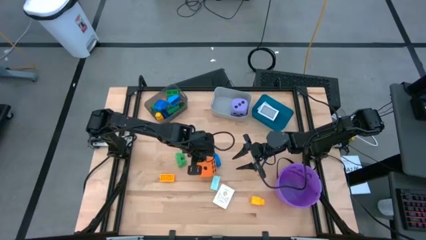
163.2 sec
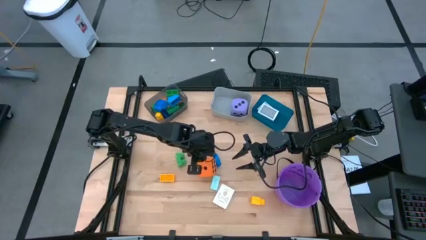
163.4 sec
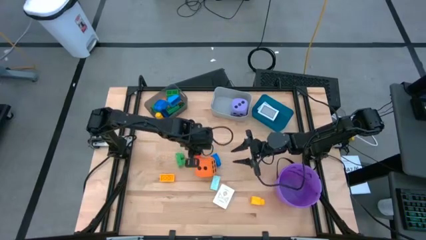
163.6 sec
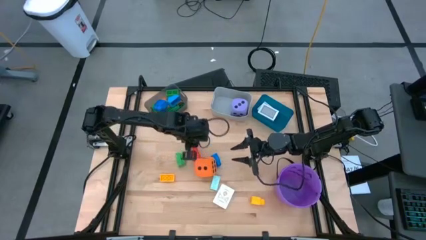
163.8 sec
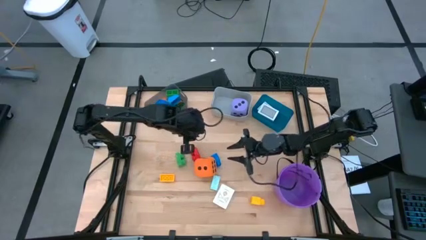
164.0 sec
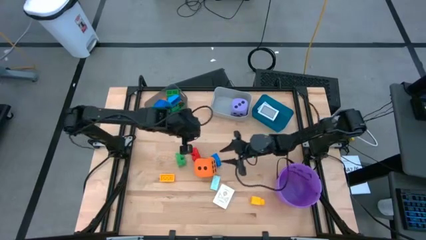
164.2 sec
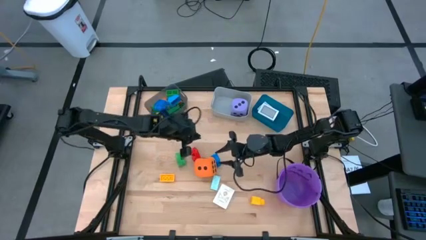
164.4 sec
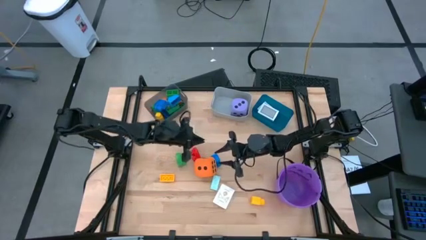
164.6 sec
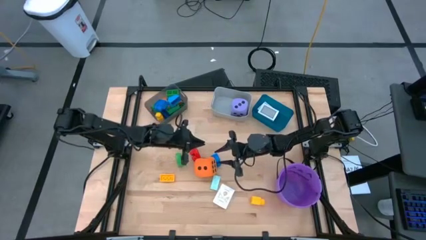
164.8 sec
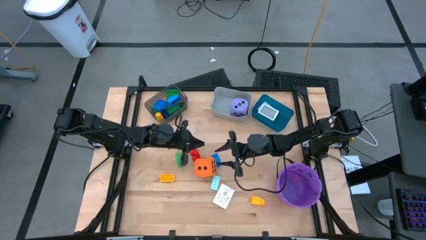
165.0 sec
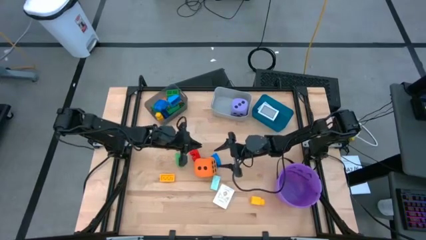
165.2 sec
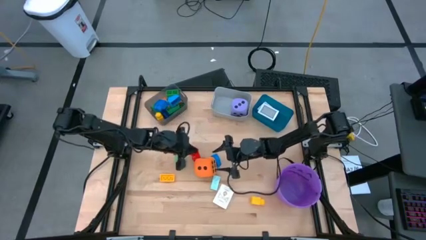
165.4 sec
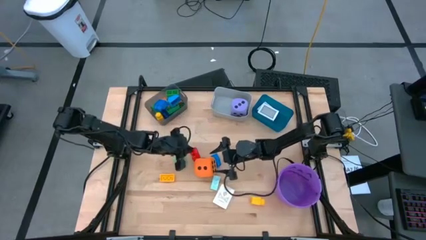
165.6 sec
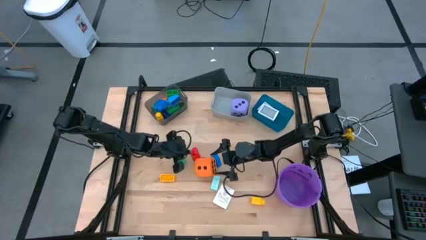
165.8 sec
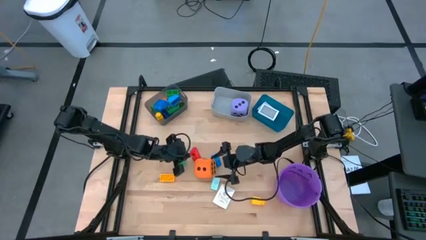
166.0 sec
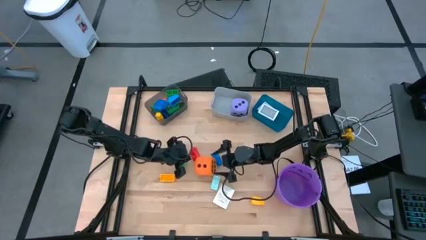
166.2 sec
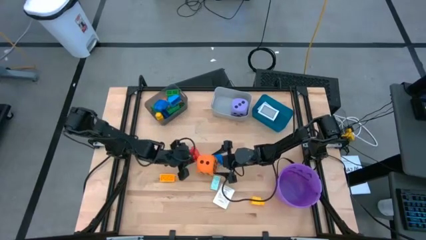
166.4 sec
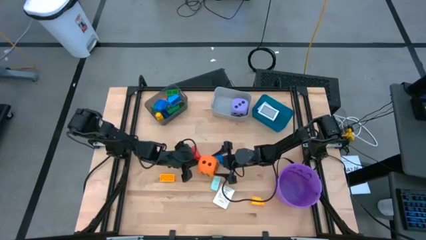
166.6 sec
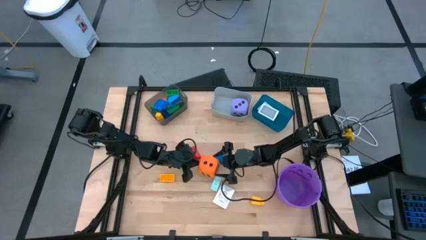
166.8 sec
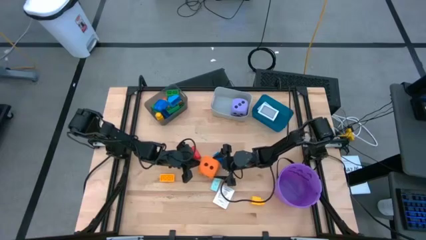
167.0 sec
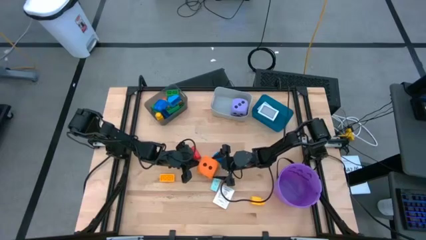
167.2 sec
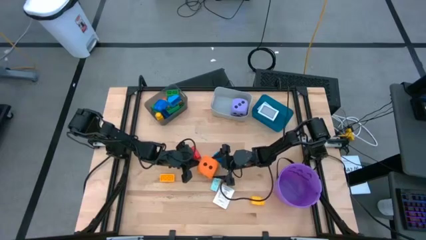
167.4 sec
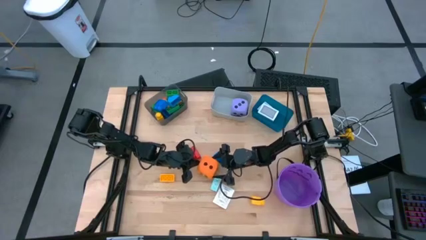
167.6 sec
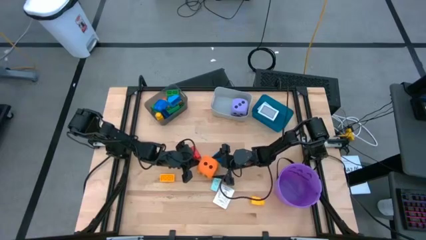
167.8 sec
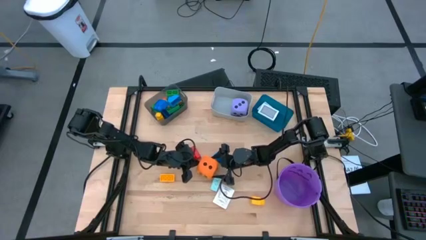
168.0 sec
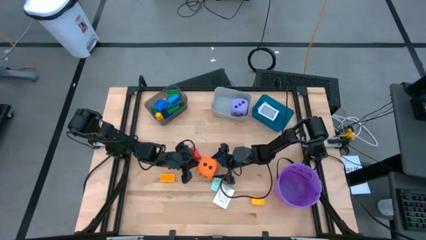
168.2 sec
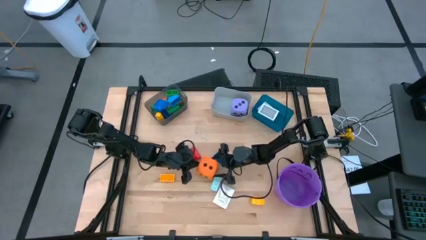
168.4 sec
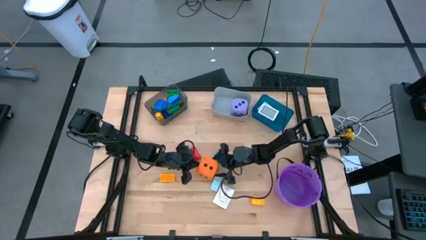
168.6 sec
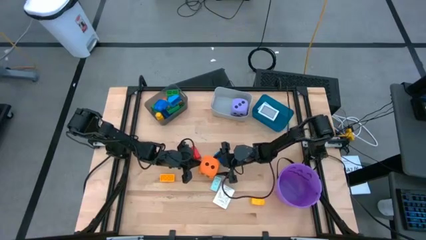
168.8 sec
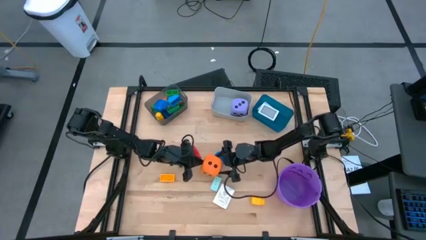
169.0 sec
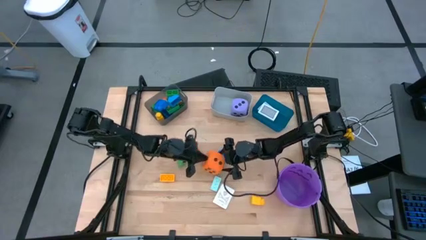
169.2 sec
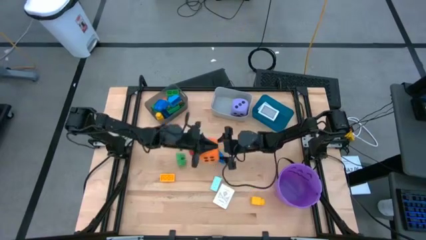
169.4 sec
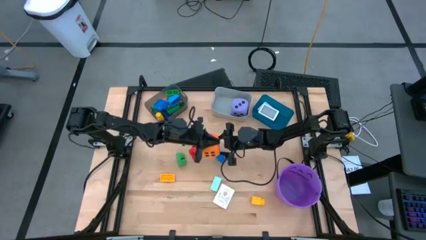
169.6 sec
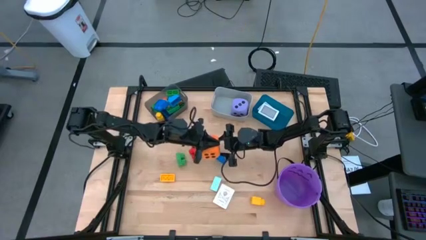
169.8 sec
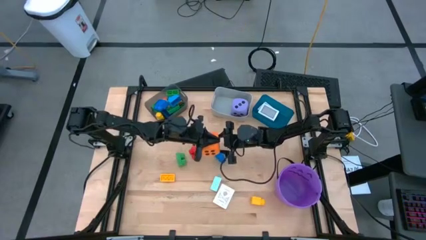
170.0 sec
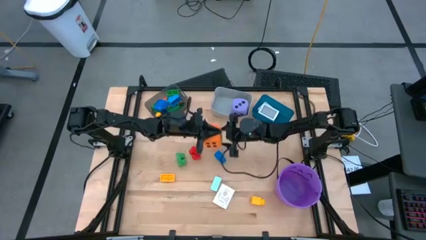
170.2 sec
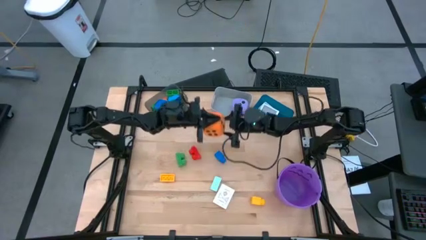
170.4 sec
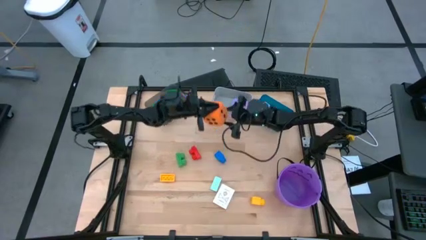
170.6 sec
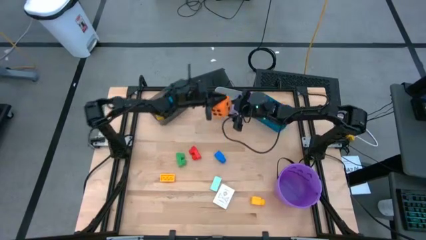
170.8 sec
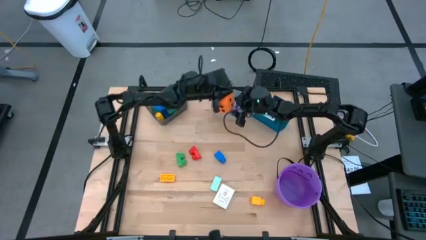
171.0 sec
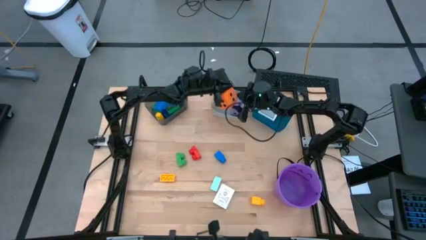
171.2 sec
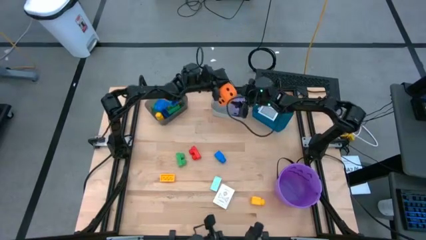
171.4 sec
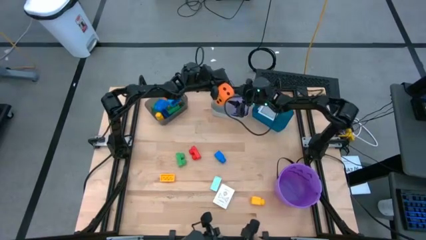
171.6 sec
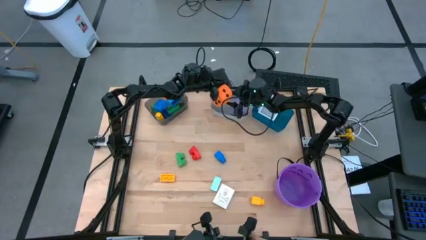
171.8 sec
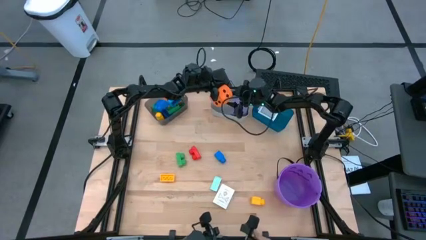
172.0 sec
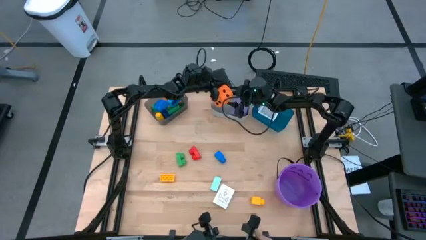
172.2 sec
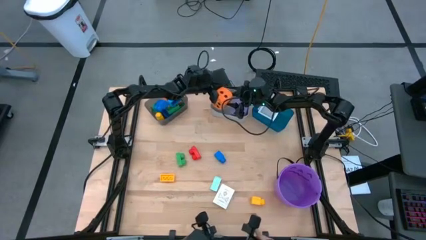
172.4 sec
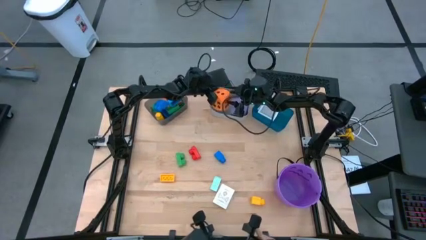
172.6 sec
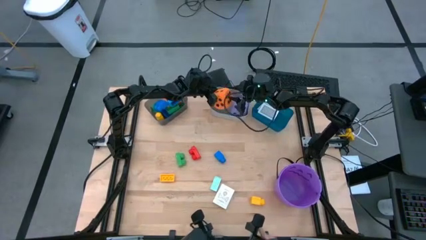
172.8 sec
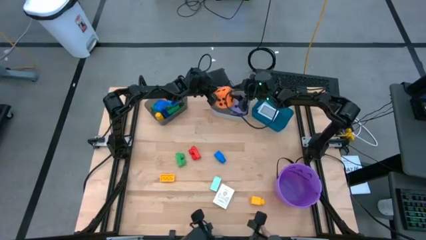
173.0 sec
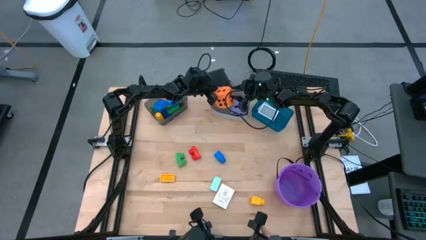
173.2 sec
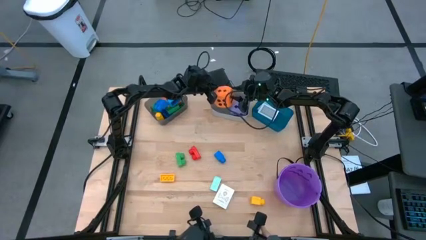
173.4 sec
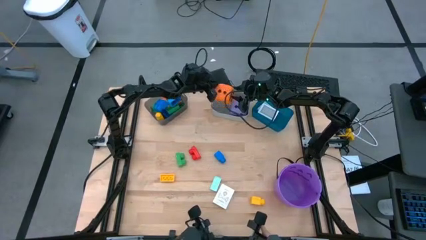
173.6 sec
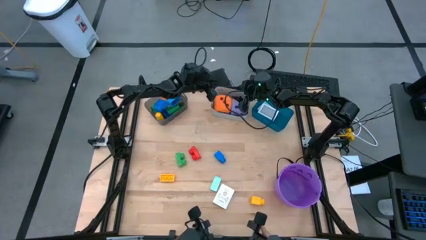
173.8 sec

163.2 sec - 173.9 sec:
Task: Pick & Place Toys
Put the orange dice into the gray bin

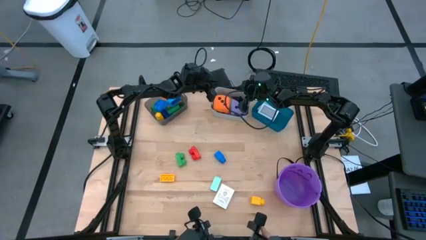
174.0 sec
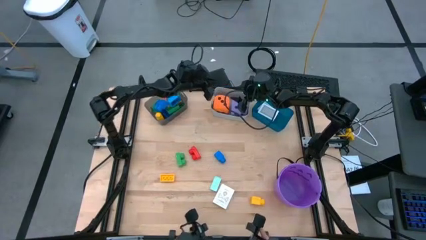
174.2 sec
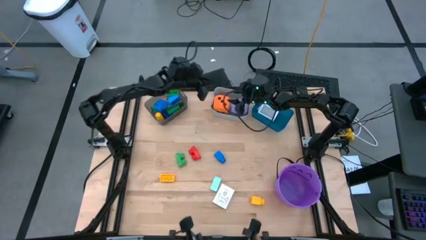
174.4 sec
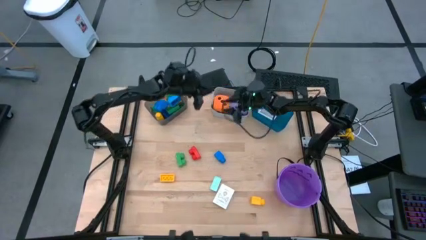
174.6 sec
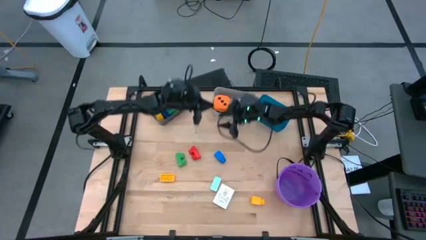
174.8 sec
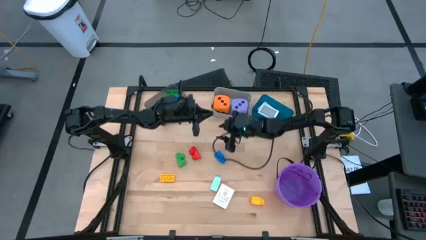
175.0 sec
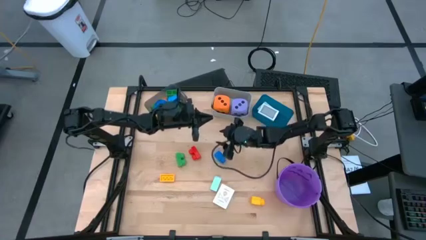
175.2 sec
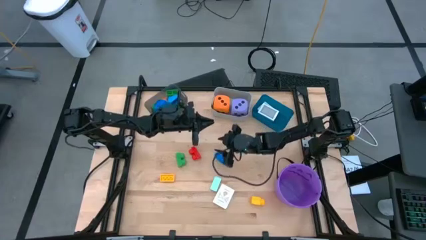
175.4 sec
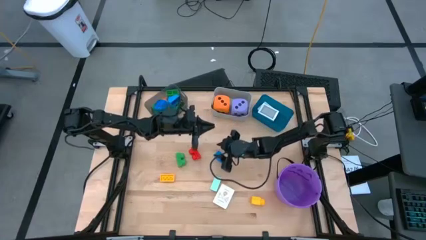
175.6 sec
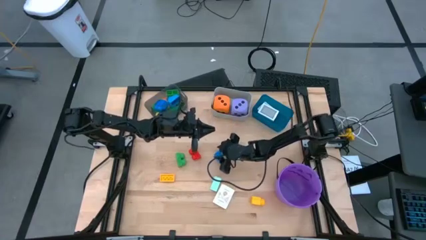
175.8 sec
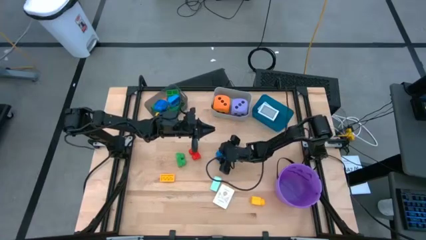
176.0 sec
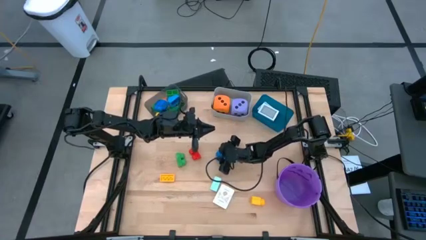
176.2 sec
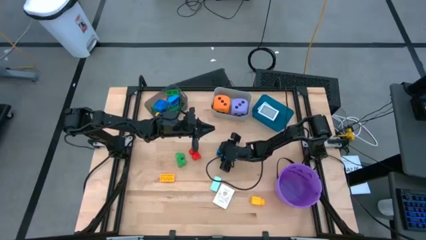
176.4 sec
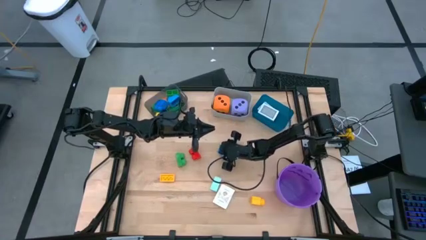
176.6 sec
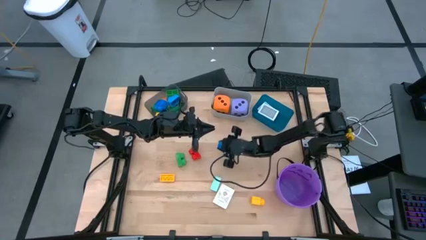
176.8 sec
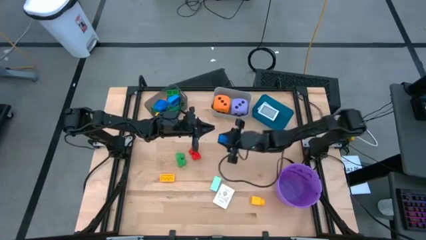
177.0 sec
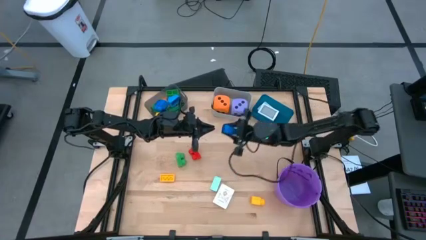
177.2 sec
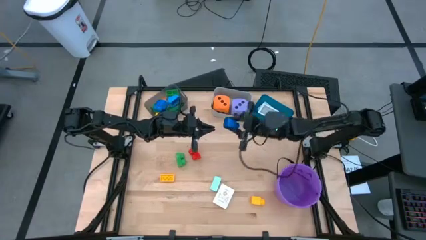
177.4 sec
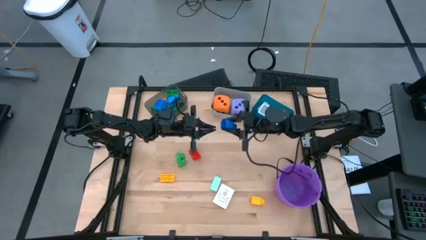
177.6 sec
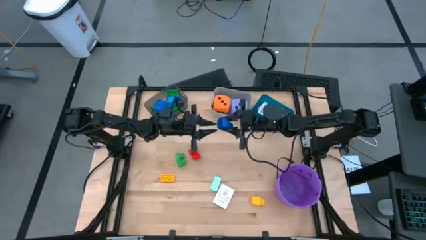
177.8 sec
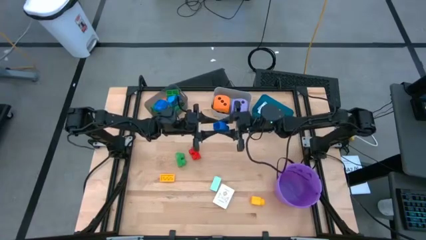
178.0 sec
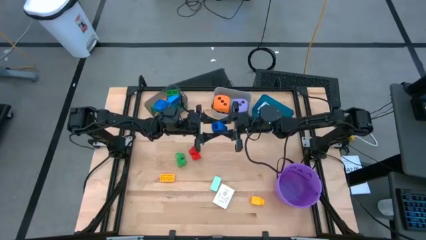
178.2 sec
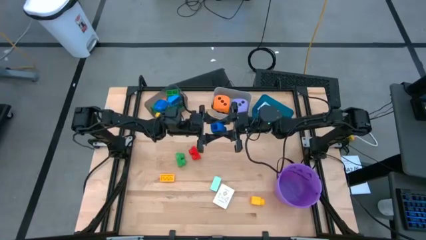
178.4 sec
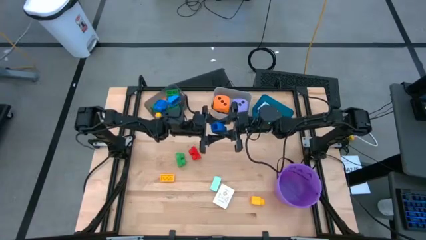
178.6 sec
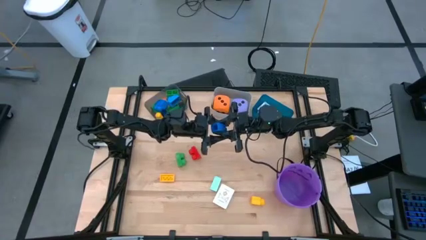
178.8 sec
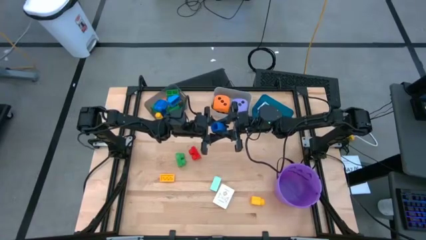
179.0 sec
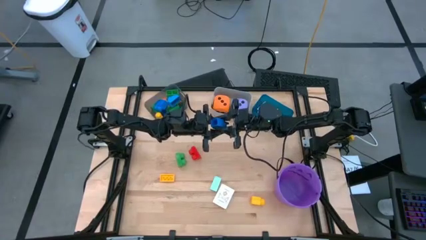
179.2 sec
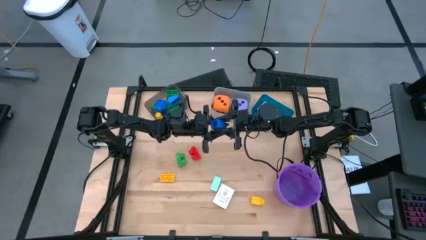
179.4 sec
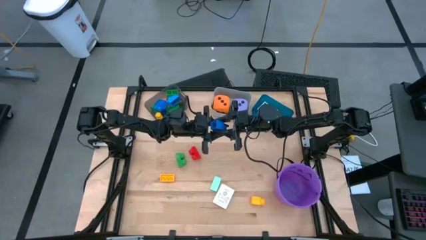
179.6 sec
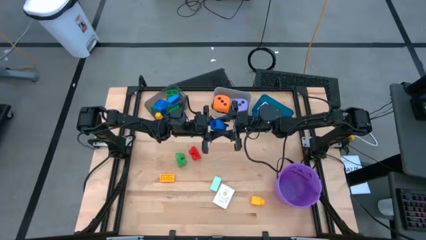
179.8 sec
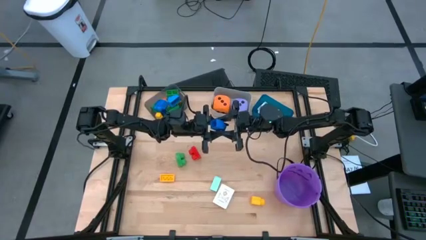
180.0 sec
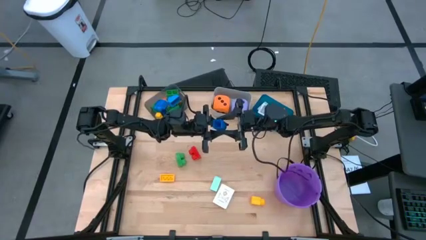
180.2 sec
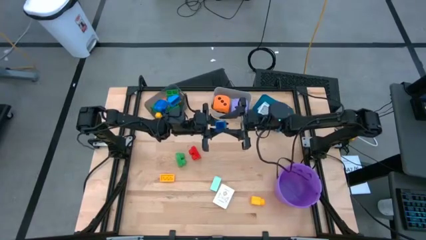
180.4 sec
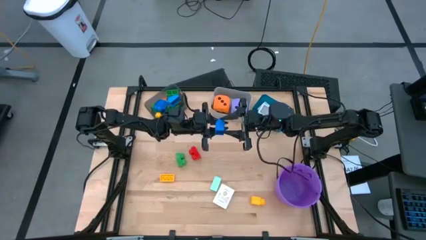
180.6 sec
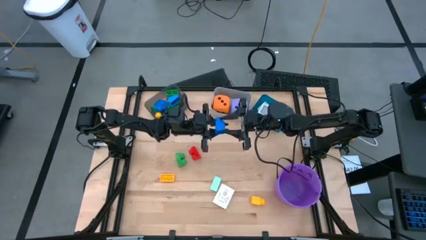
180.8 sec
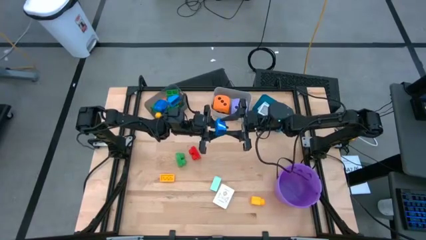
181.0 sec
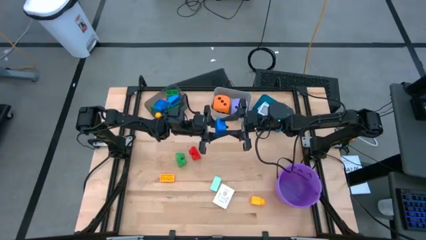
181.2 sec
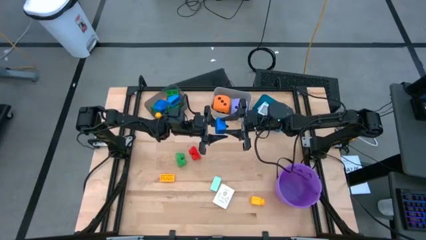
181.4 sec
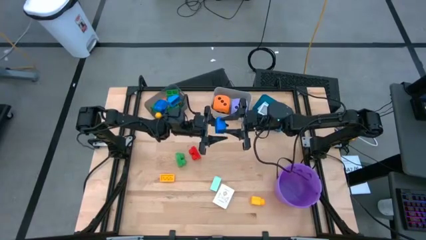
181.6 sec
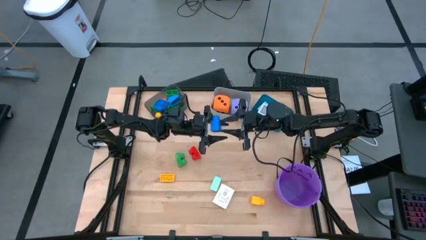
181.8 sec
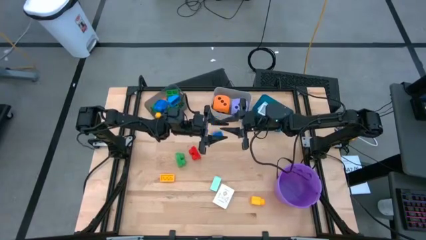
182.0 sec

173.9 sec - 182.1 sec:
Put the blue gamepiece into the black bin
